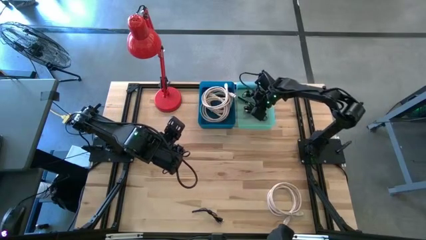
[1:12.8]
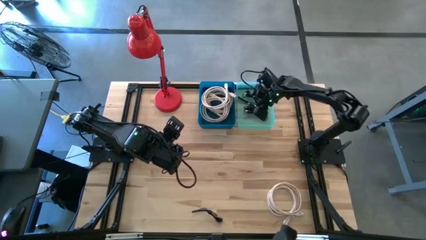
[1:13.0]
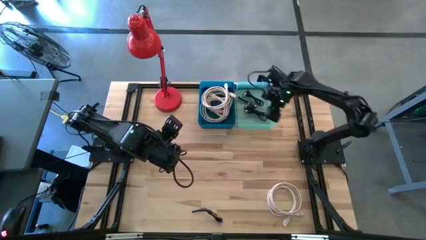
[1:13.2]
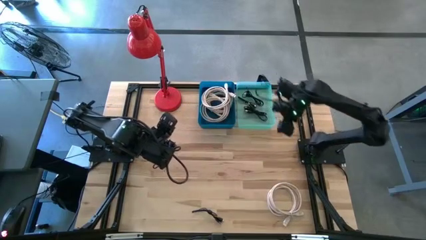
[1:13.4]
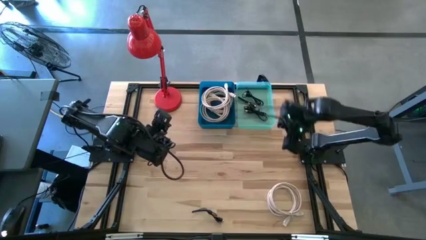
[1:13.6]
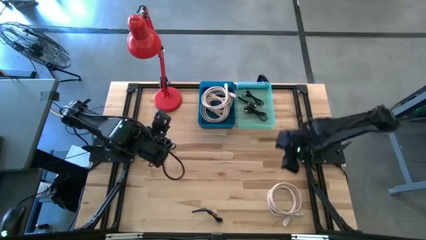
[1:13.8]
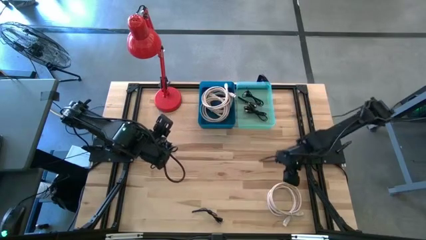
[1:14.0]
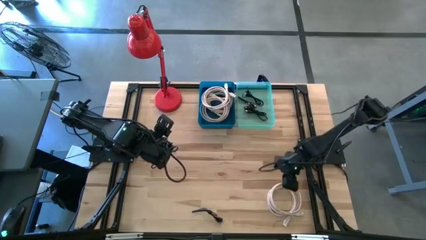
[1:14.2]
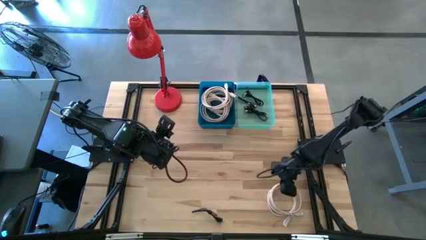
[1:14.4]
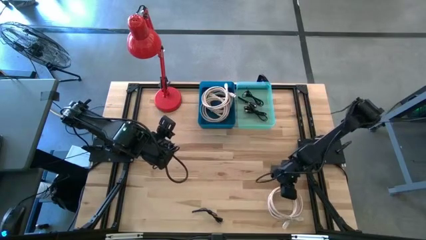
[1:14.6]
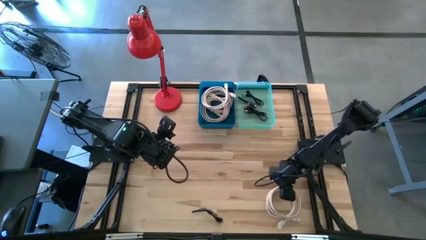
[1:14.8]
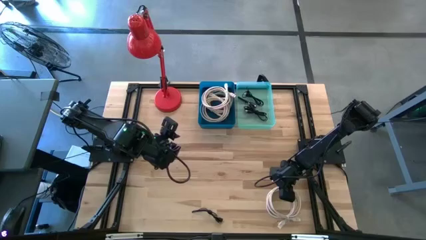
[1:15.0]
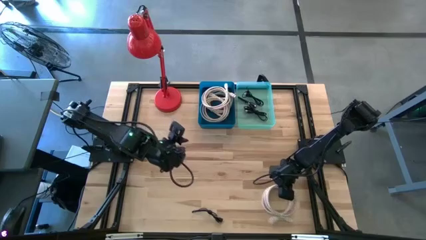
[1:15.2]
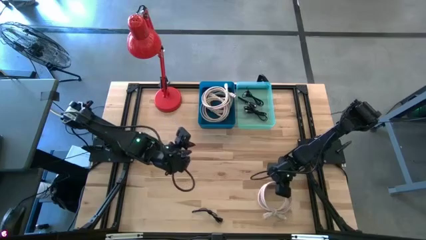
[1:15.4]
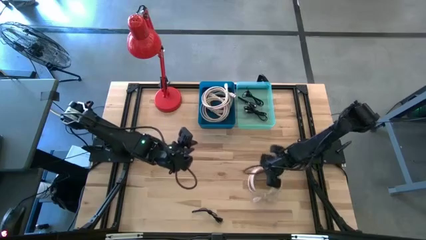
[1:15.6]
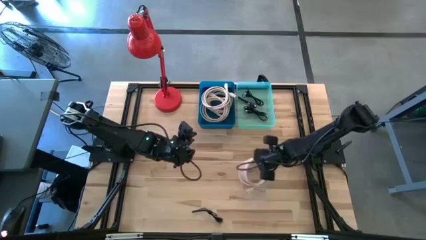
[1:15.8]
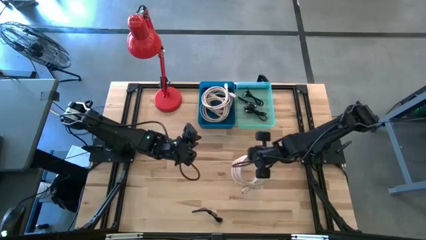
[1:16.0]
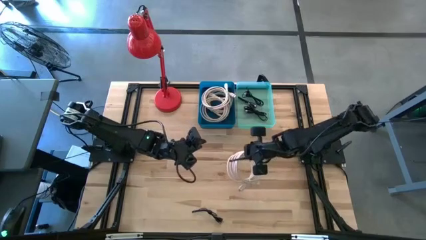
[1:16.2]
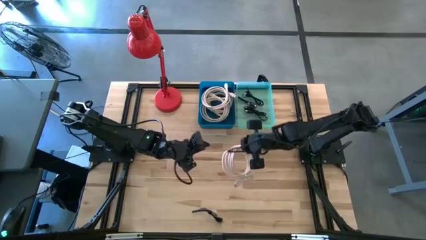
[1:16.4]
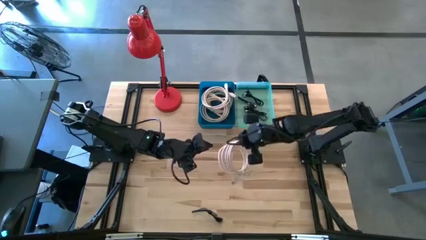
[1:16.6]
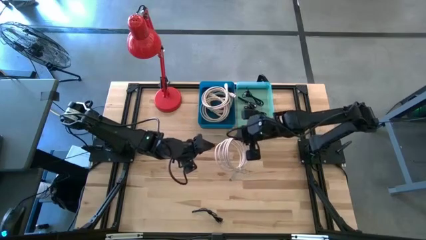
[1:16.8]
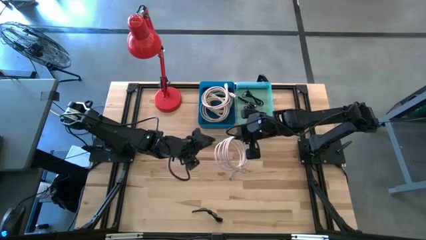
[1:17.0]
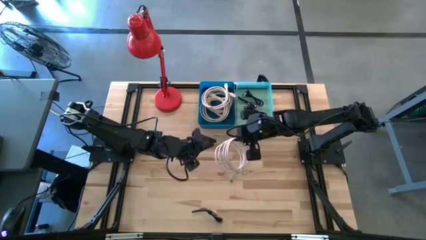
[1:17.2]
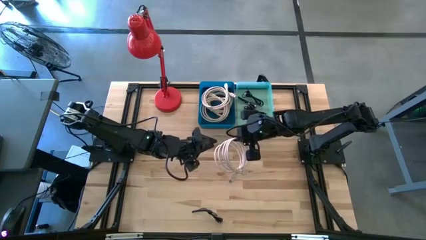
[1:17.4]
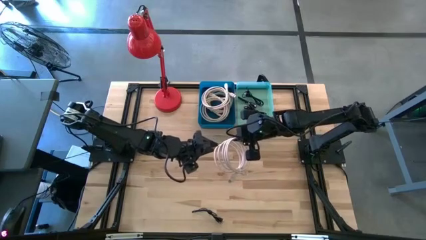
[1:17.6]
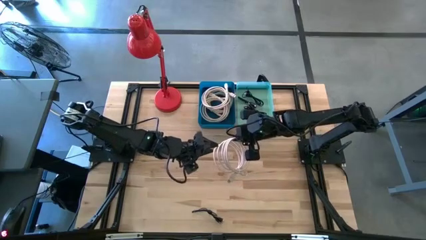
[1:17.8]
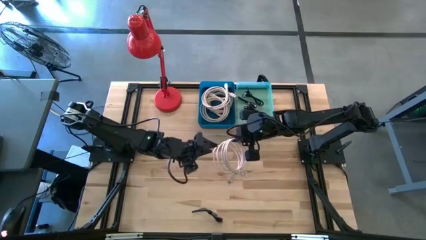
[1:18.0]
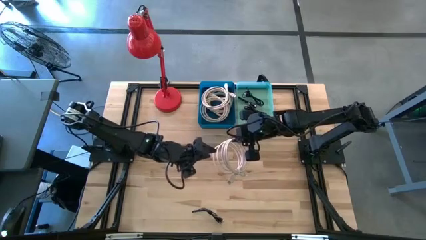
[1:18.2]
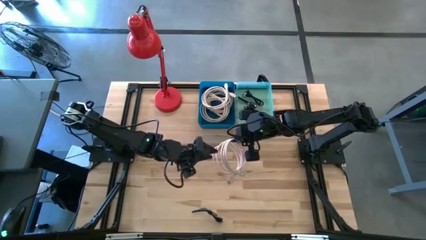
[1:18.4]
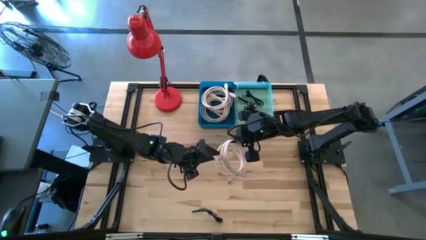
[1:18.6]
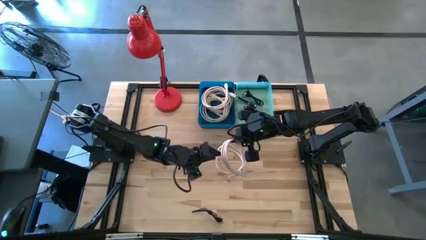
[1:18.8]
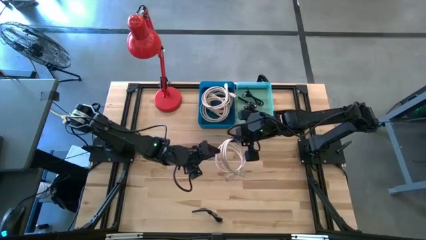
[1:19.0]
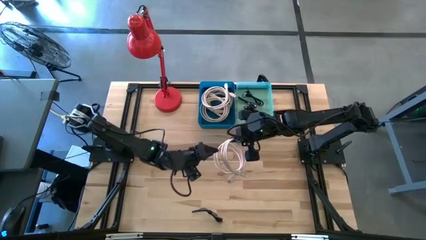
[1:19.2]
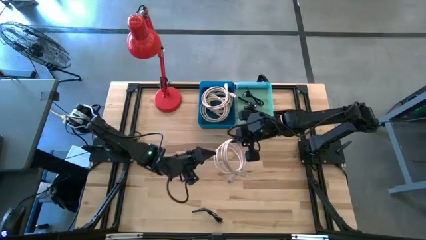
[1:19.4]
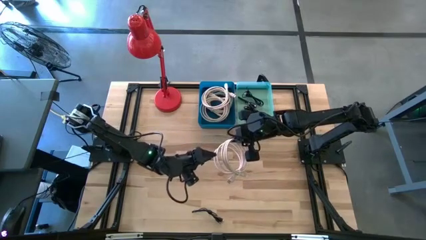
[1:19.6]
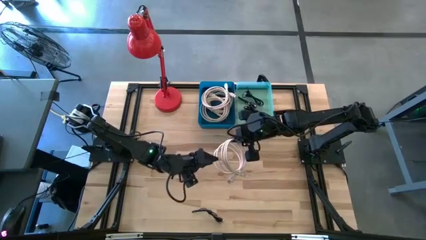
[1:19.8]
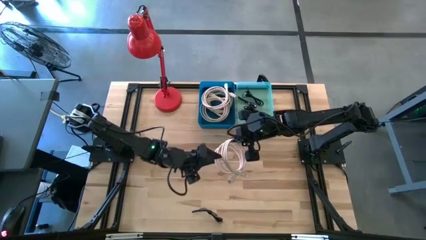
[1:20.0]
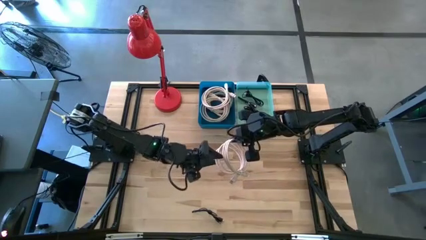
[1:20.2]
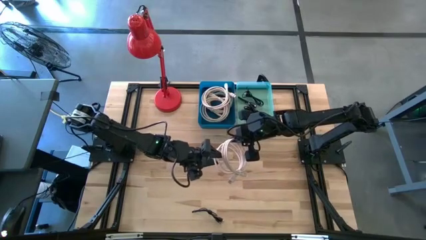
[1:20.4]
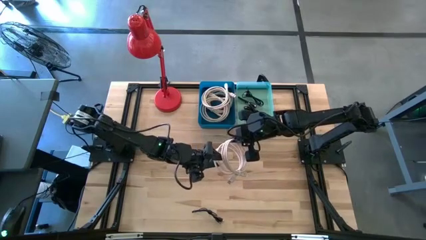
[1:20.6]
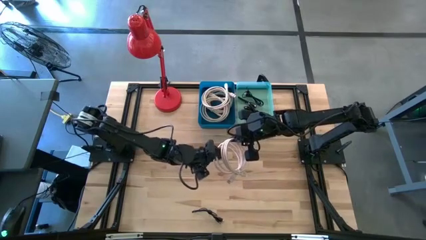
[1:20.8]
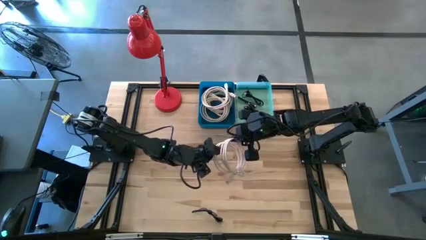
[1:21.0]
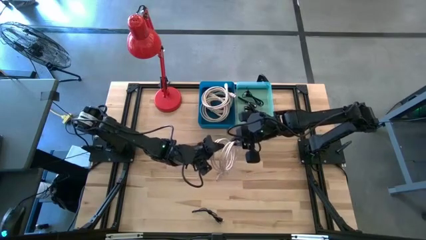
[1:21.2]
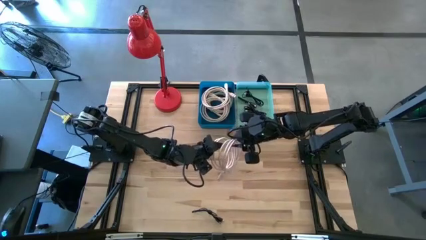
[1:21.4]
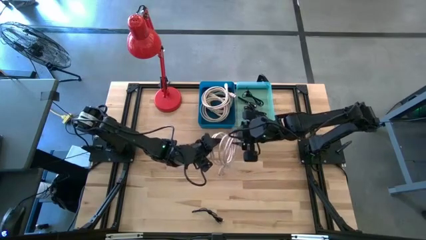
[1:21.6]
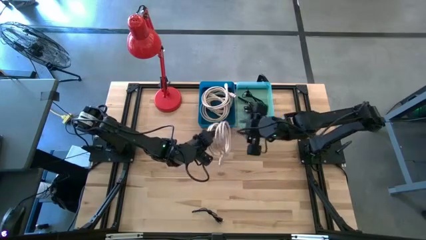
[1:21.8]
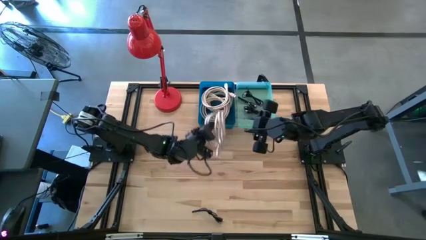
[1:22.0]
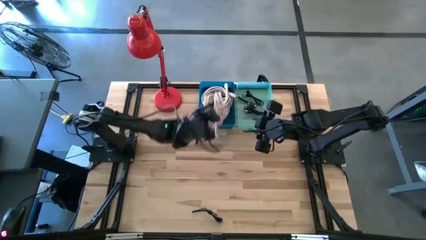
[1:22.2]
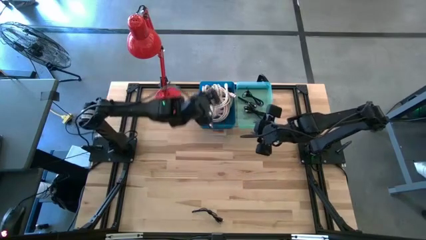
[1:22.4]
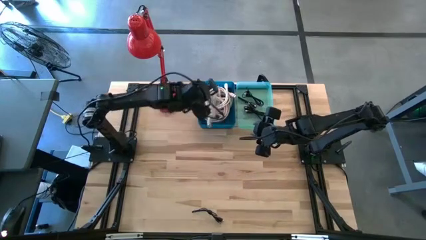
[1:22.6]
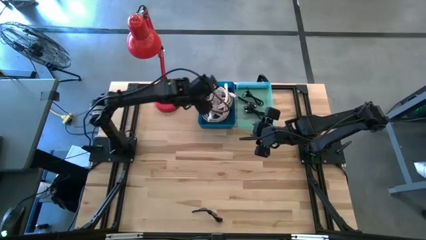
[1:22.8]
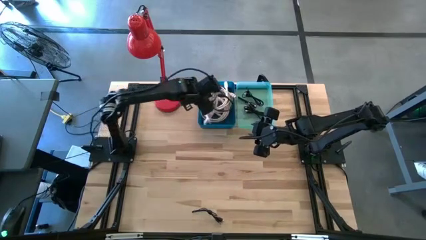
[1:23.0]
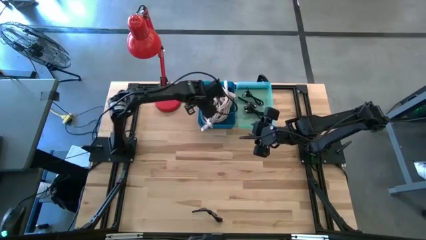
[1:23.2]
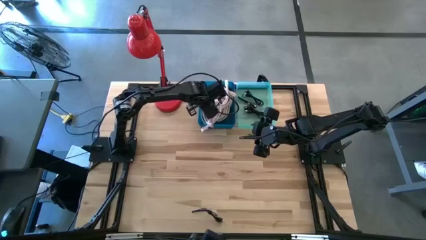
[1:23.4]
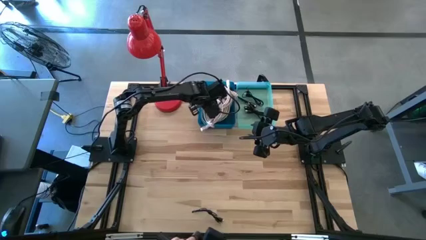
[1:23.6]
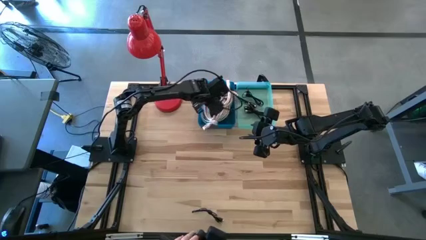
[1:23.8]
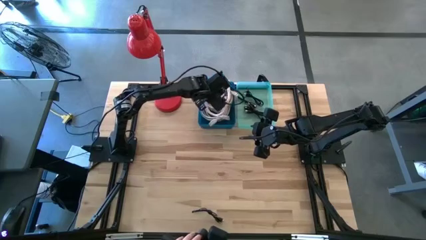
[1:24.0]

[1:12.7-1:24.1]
Task: Pick & Place USB Port
Put the white charger cable into the blue bin

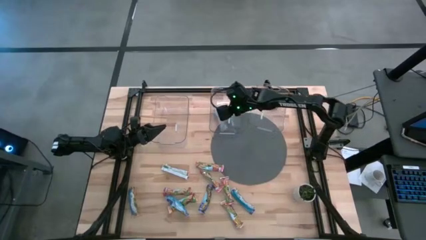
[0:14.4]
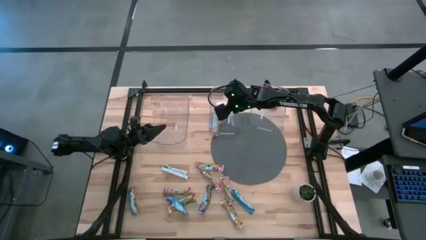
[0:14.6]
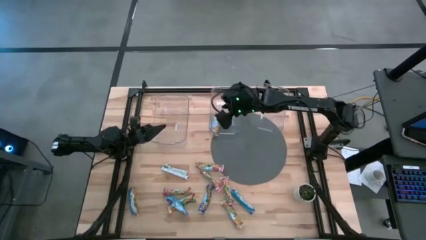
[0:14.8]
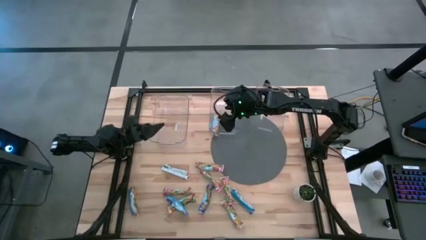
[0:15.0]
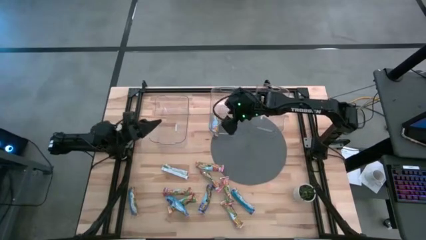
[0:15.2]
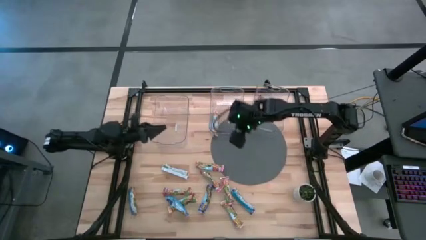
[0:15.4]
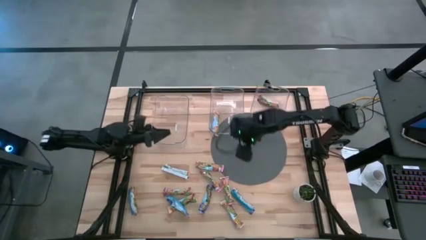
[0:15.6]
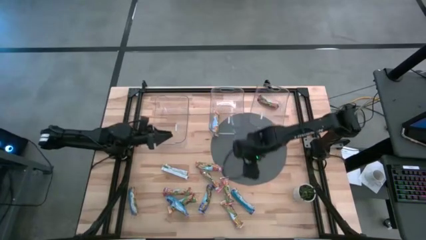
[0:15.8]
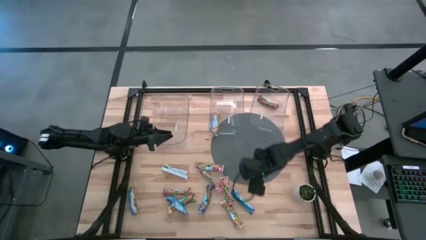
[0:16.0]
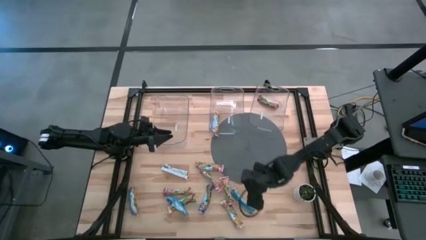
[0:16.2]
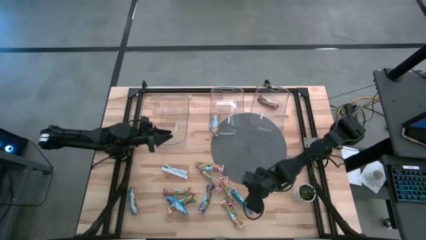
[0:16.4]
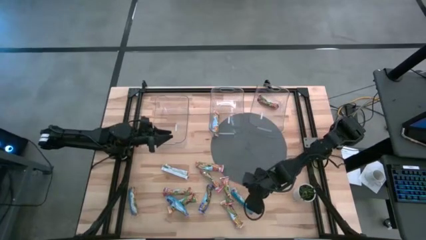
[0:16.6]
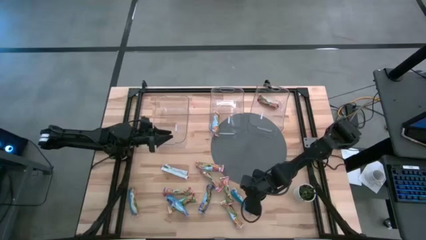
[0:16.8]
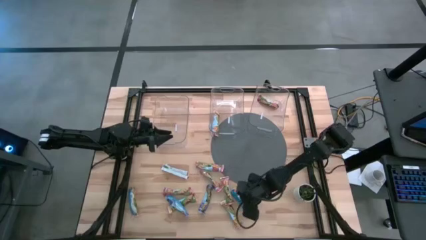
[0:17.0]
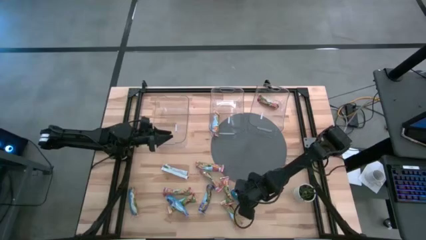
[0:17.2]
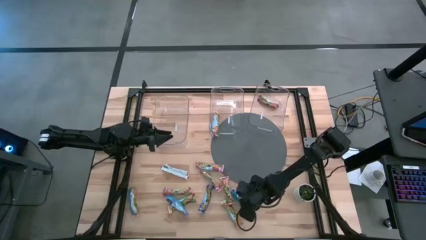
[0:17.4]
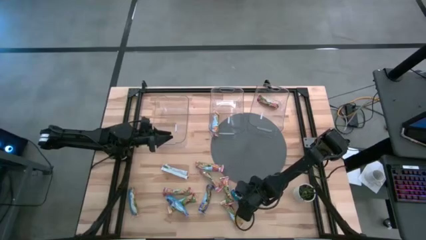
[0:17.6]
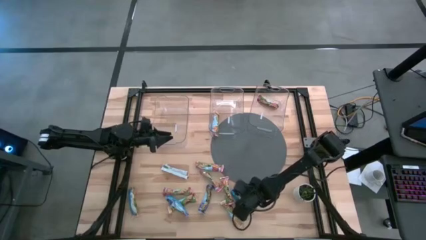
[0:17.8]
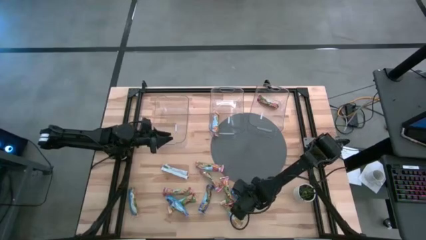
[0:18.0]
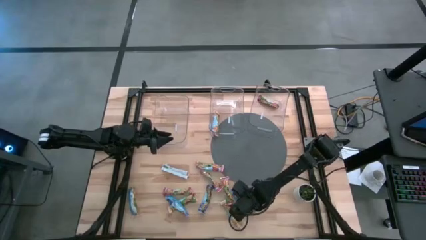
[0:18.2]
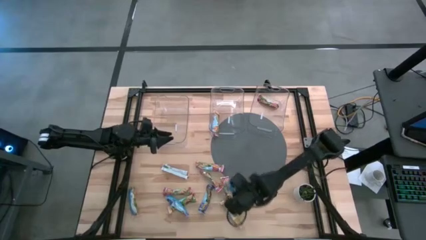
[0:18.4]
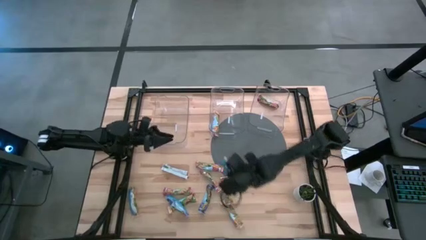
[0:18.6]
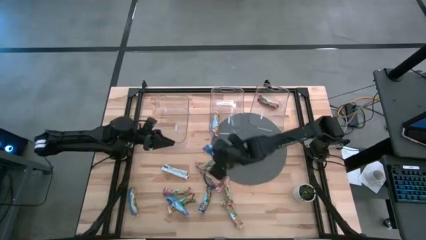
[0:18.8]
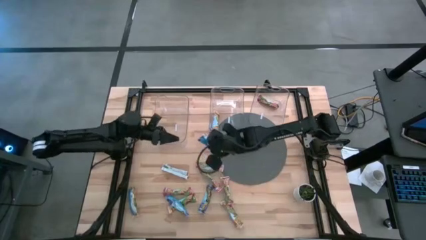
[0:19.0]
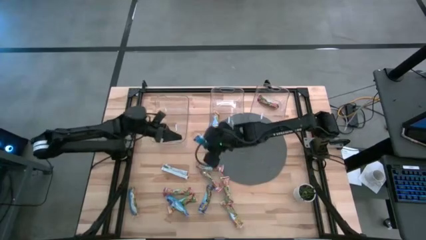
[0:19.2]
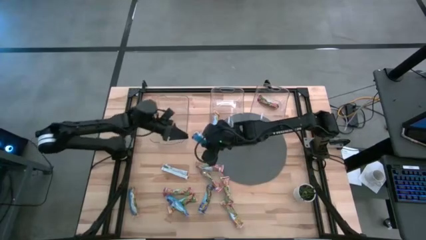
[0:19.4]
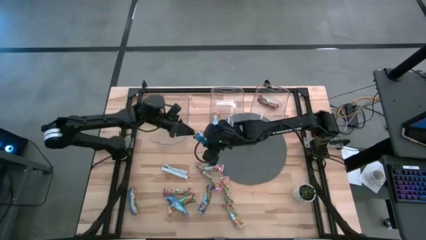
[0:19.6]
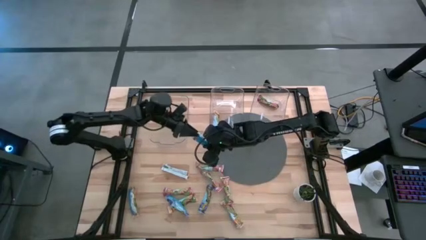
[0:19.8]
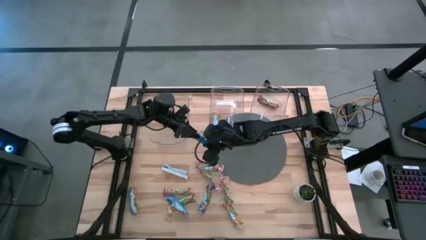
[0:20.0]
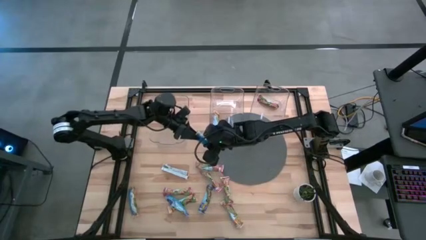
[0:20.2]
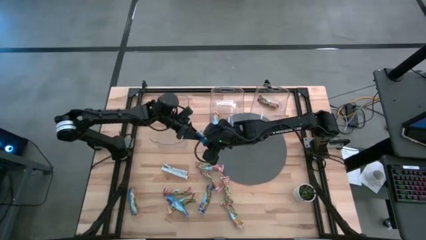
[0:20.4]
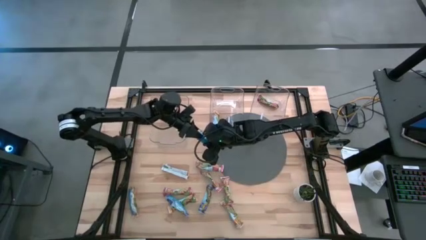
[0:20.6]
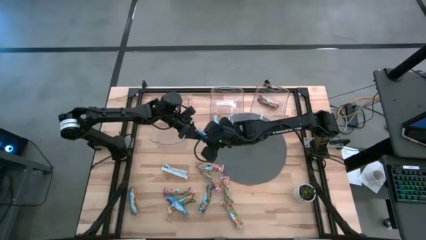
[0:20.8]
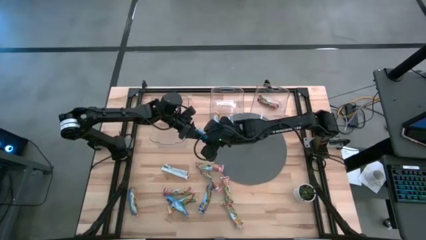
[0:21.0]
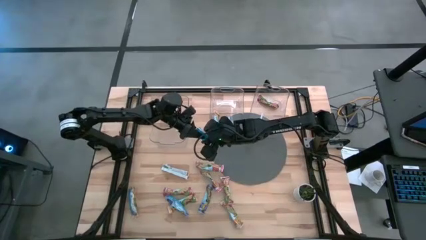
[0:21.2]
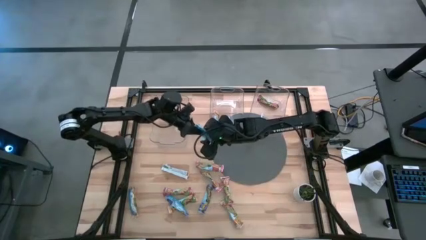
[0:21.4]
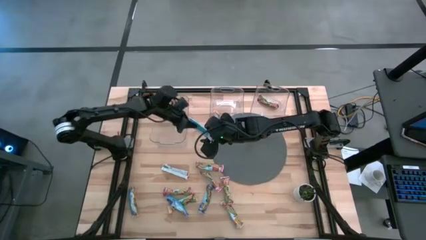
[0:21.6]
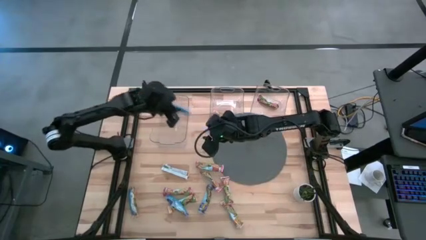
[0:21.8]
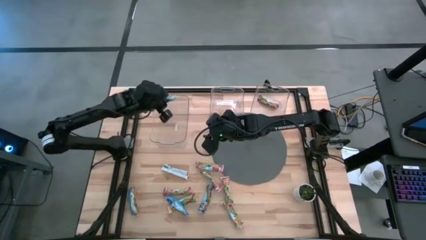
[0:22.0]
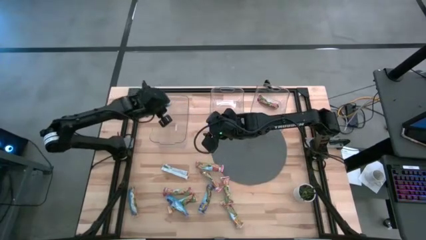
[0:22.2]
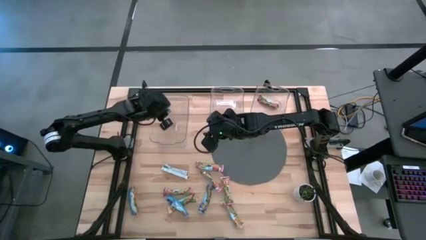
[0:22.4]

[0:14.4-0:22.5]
Task: Pick and place Granola Bars by type
Put the blue granola bar into the left transparent bin
